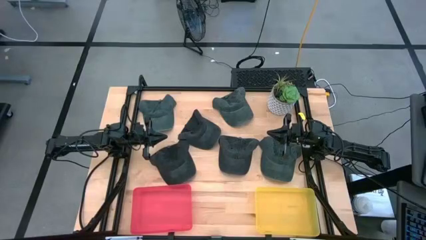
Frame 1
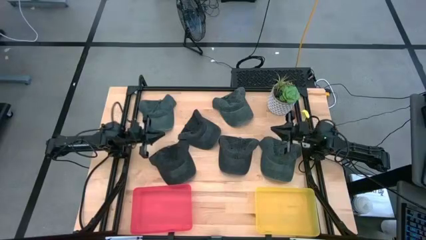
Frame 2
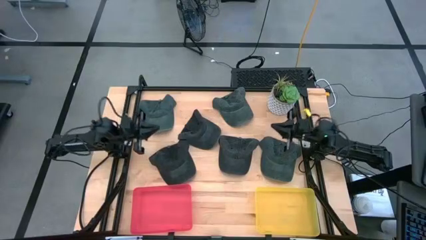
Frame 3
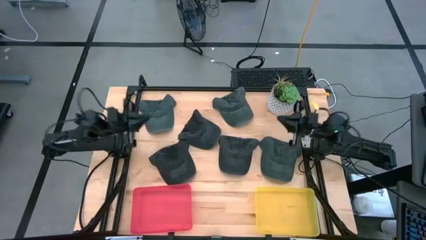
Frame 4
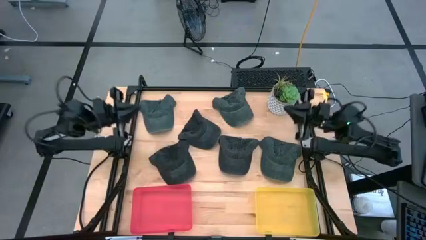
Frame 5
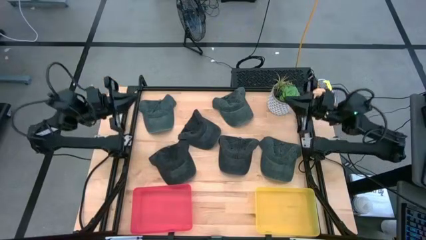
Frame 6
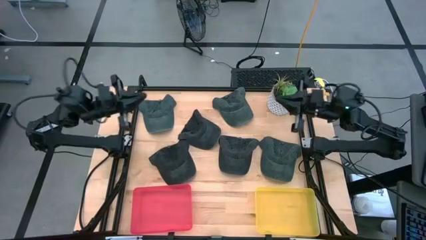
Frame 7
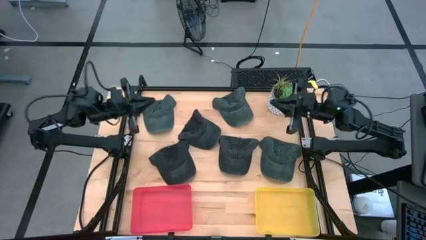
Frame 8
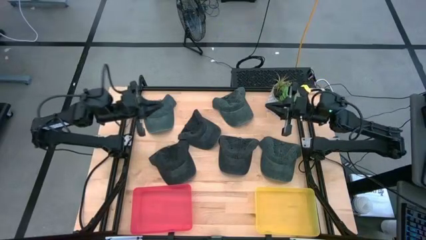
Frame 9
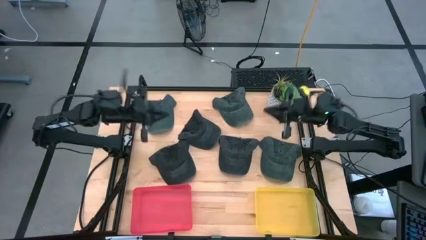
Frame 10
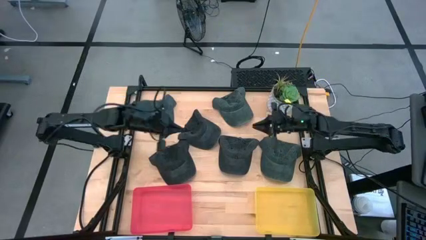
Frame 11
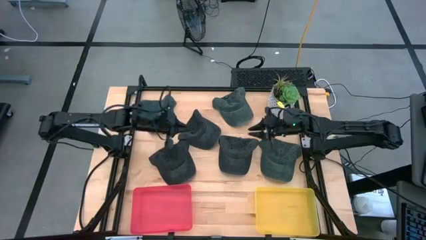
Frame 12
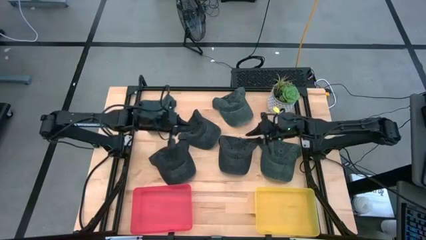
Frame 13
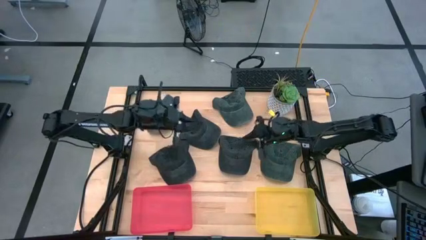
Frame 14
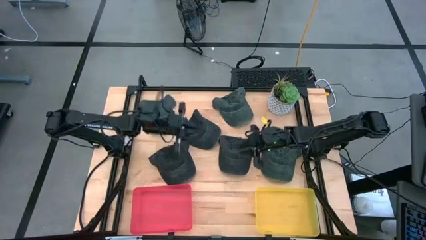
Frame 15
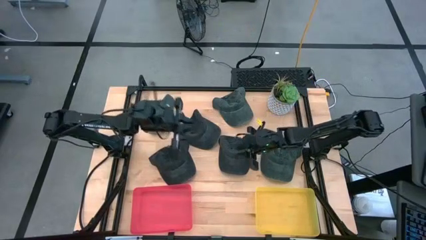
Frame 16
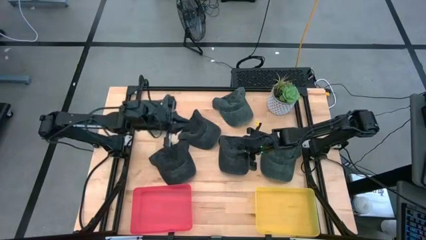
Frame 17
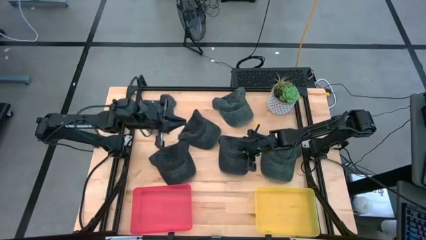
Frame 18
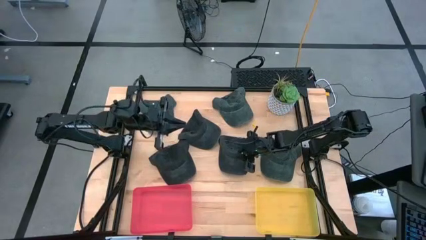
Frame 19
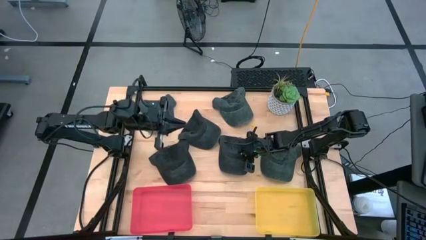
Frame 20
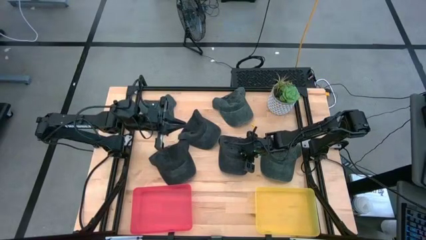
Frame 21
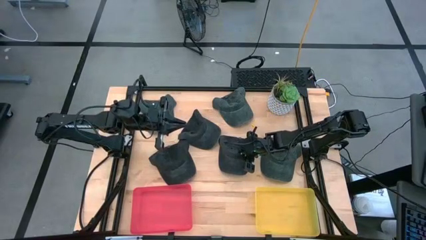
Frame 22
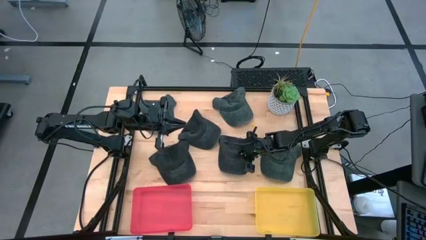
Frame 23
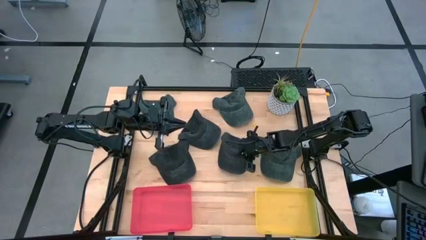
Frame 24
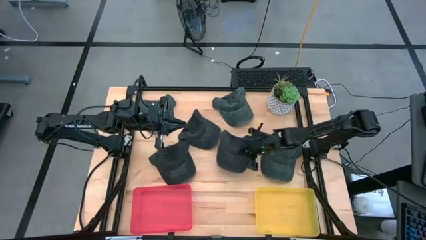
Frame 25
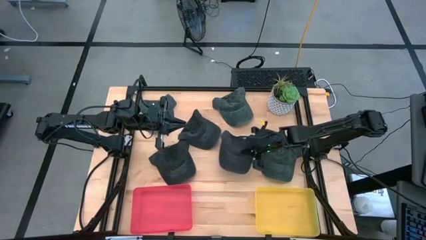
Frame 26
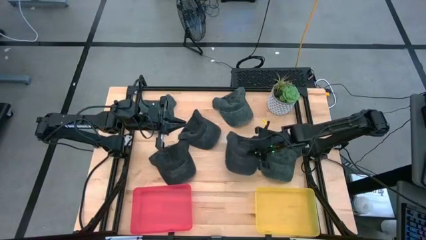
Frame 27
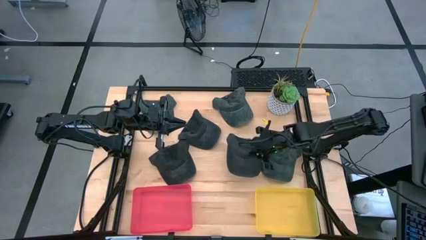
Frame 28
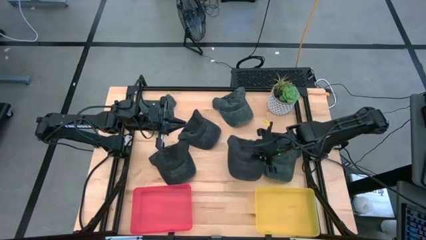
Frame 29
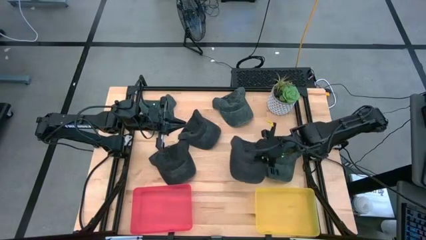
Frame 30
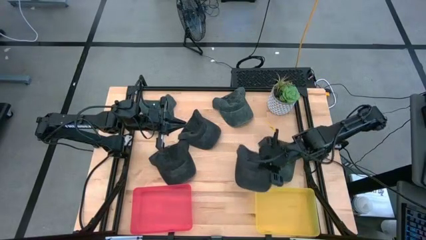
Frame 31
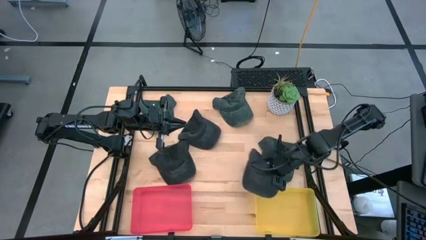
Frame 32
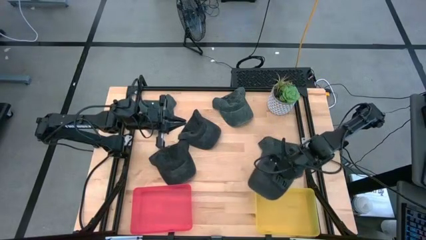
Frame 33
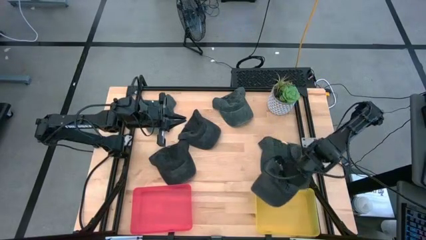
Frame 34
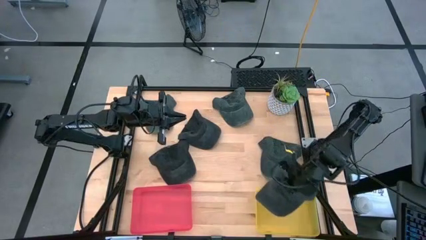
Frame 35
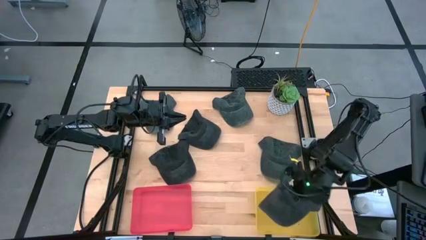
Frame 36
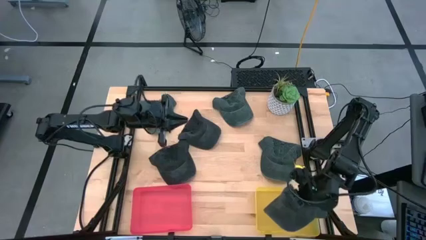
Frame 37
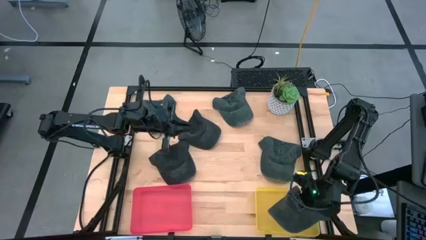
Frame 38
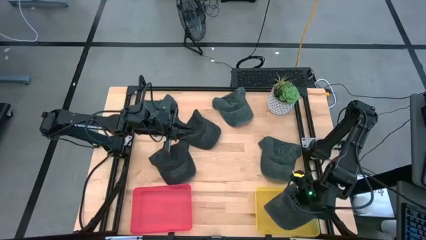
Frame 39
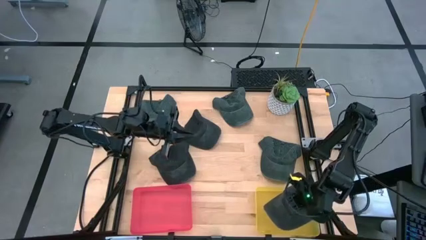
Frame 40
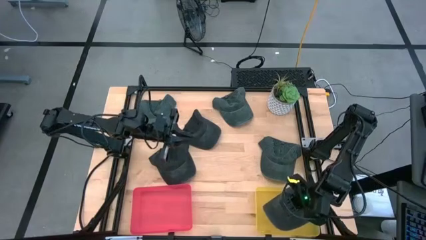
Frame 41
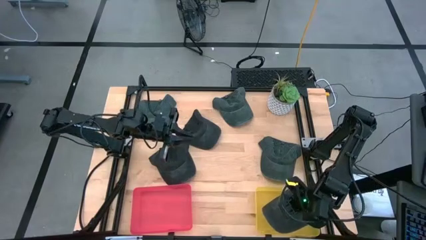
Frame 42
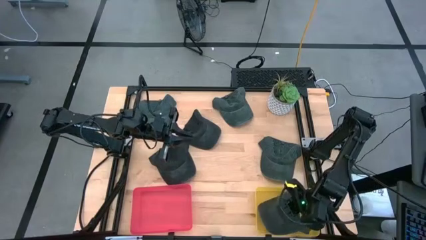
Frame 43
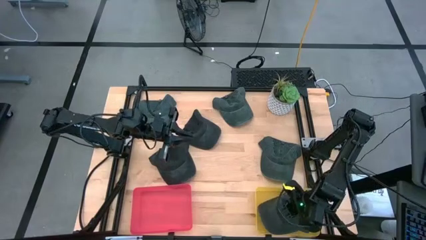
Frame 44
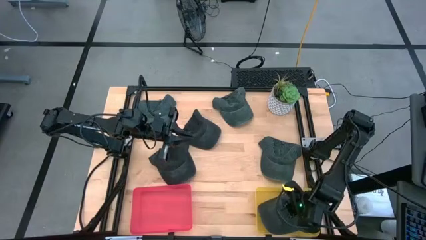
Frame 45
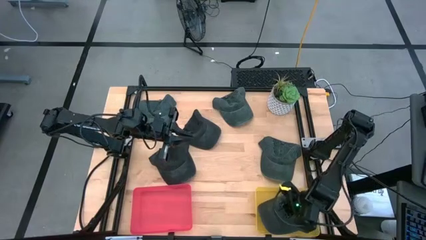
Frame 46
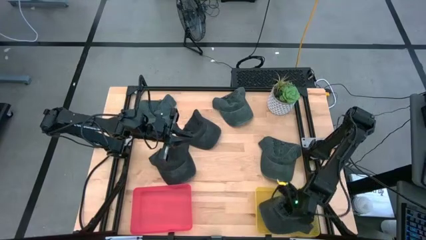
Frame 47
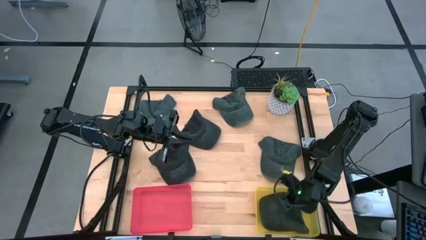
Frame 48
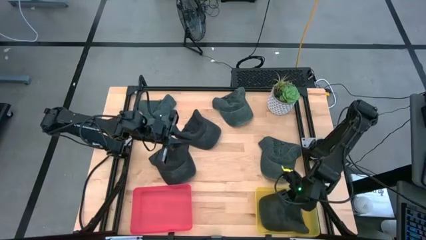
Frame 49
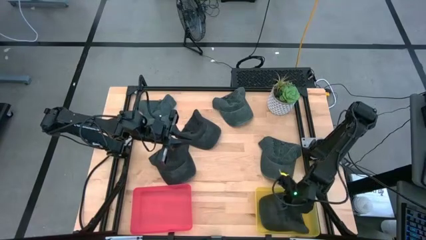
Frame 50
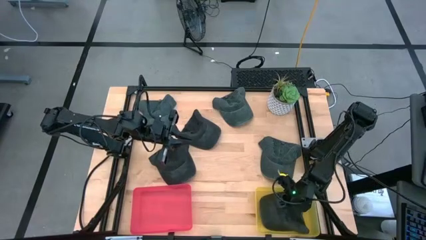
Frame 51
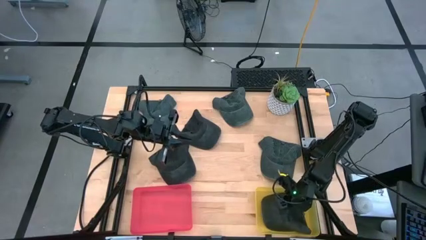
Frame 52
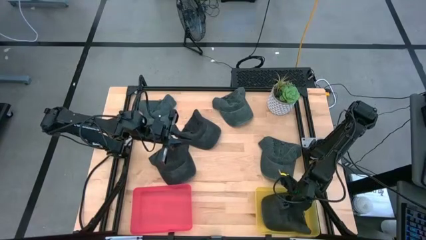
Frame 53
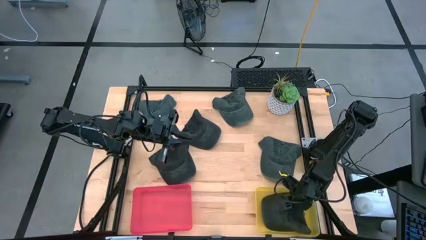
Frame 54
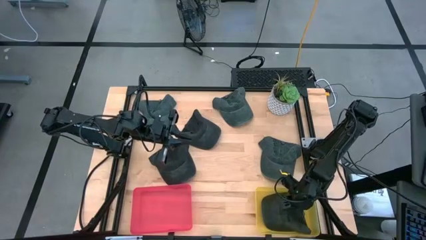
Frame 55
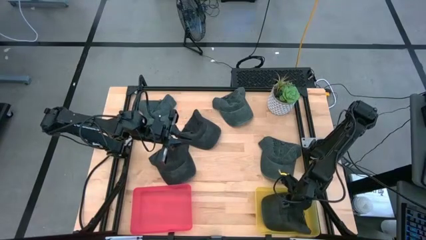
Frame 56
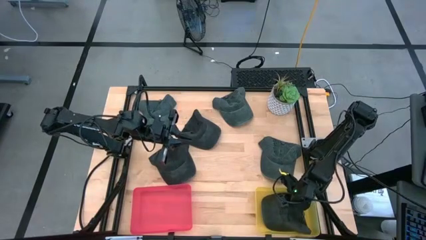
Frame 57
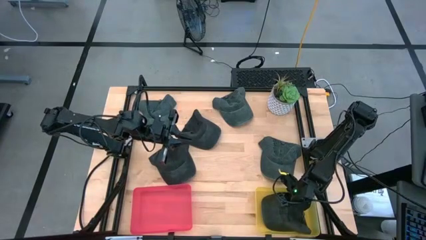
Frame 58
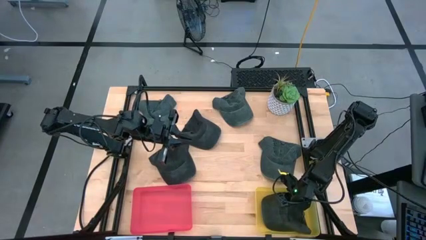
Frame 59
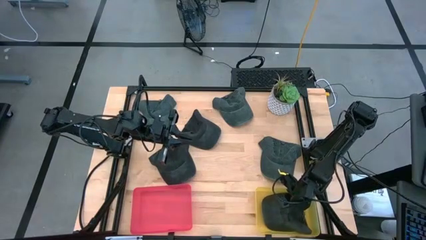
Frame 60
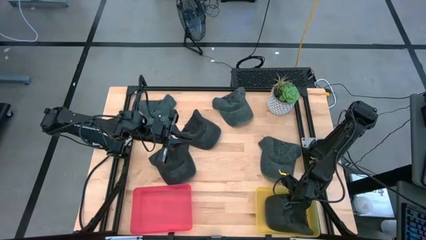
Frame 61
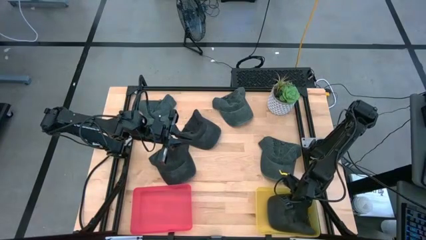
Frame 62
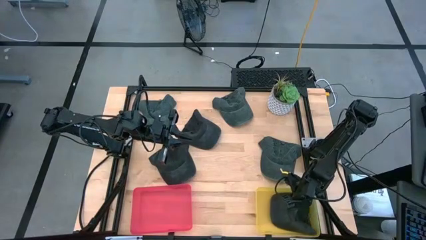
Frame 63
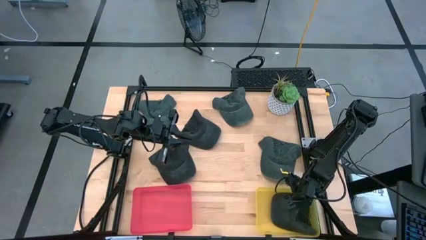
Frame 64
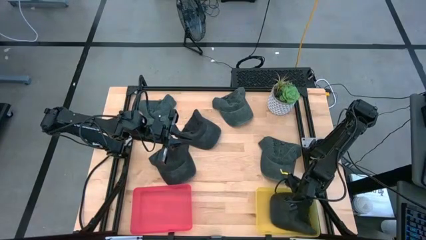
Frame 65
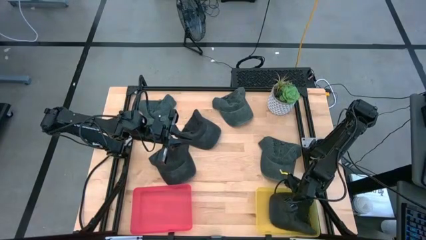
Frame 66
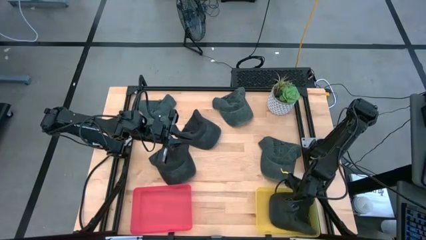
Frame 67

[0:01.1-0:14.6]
Task: Pick & Place hat
Put the black cap into the yellow bin
